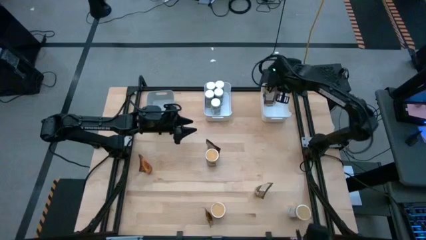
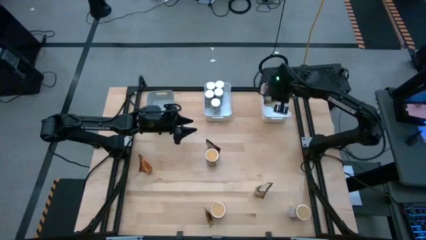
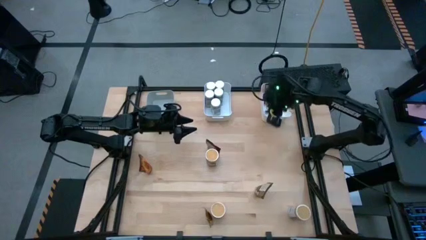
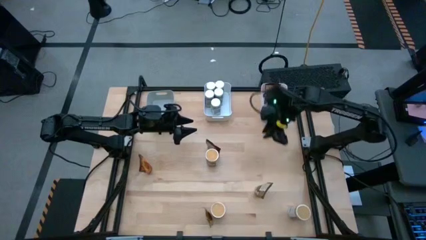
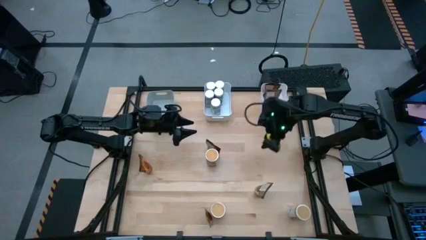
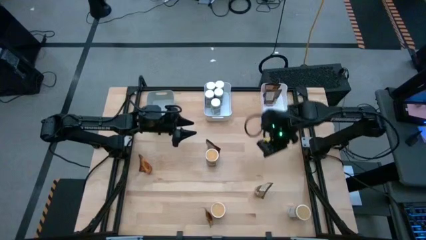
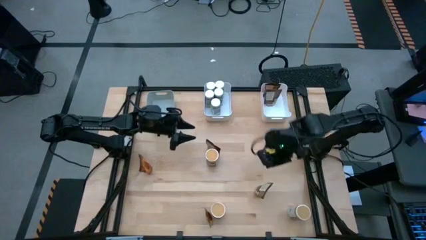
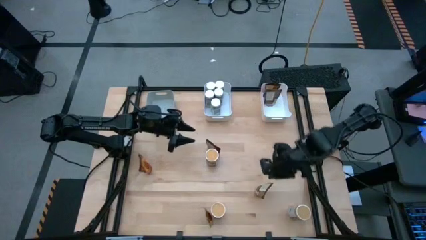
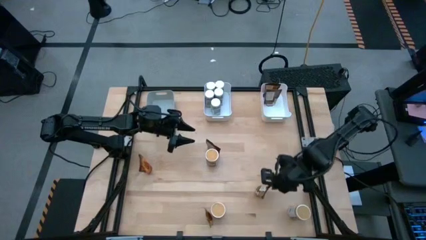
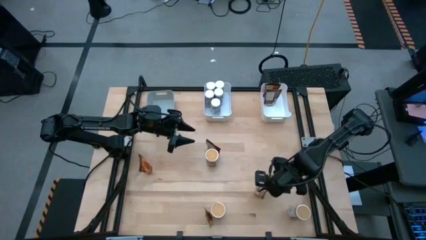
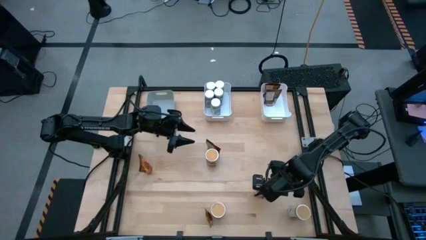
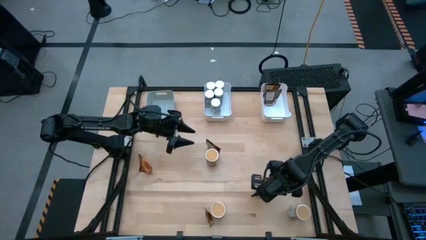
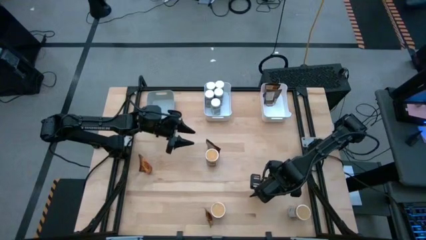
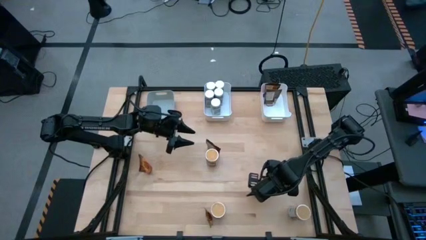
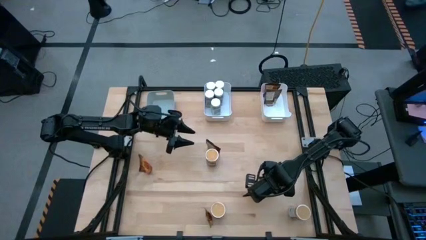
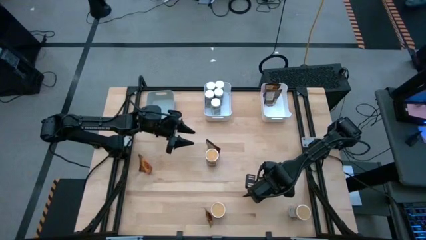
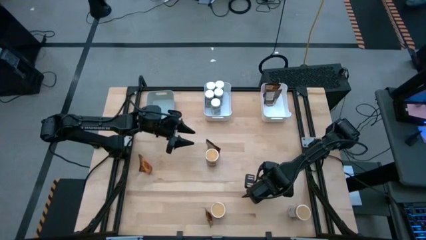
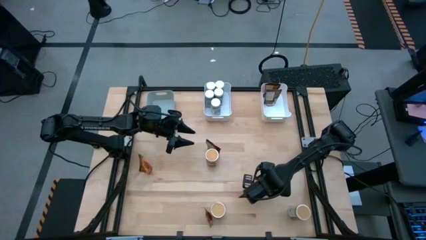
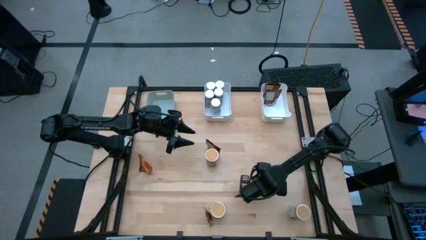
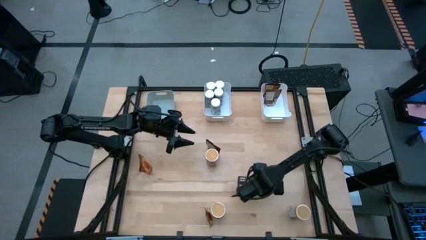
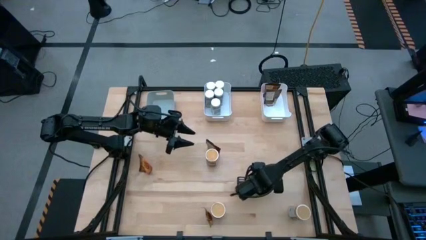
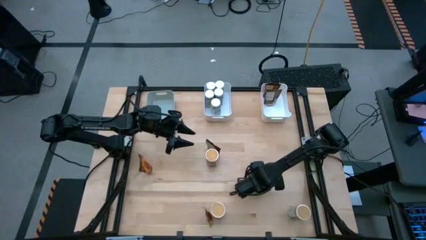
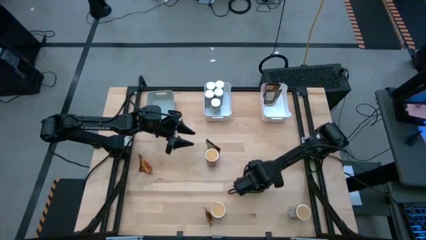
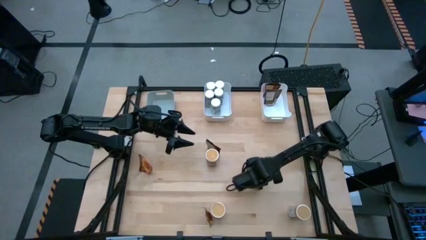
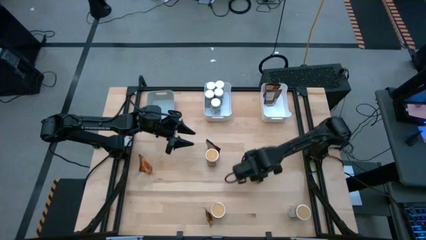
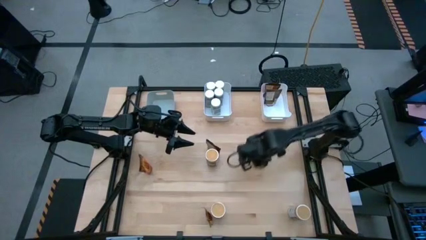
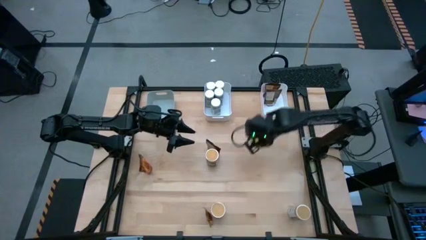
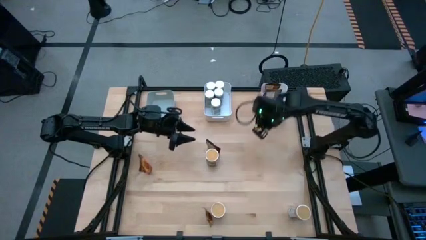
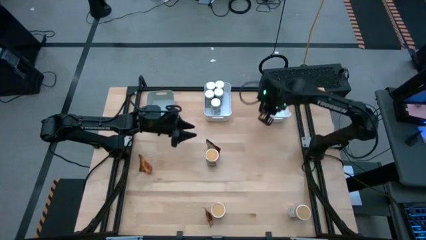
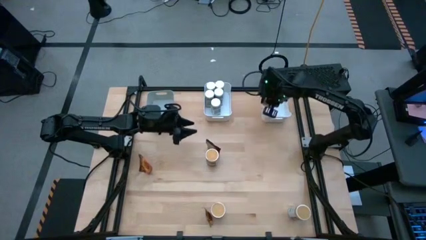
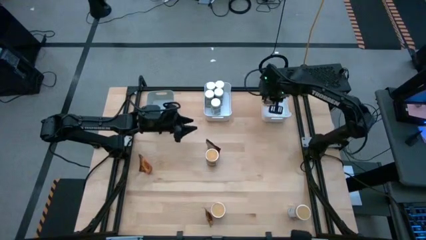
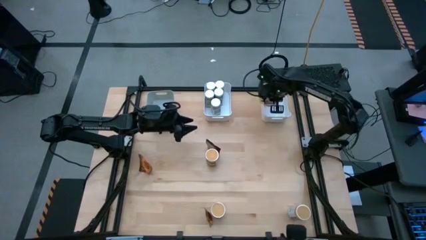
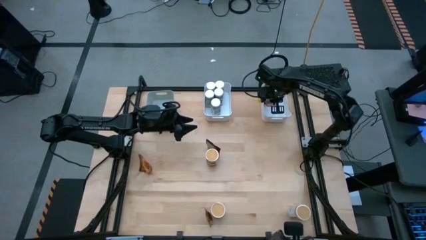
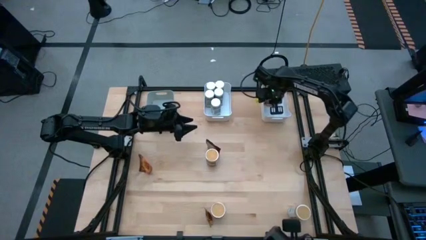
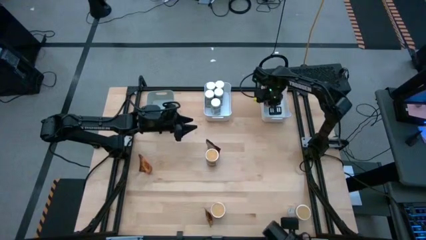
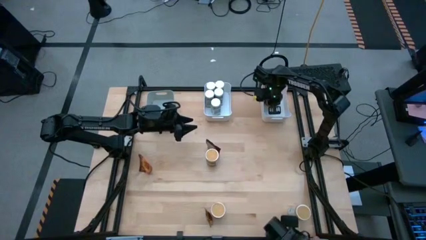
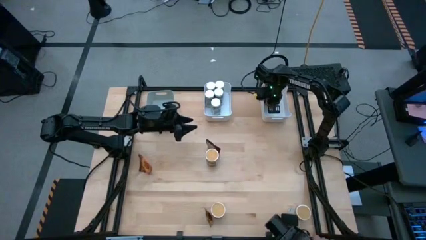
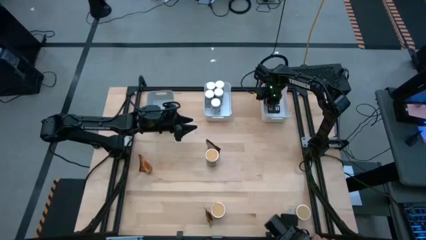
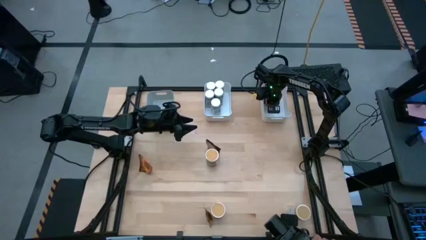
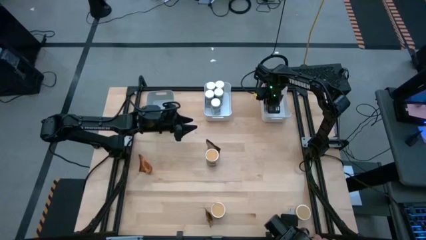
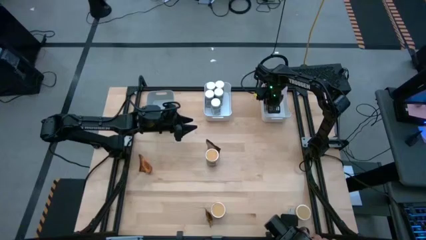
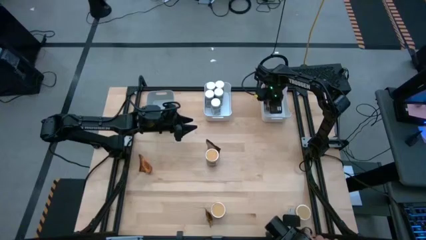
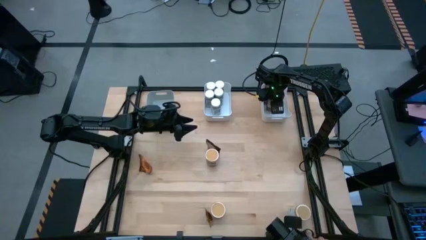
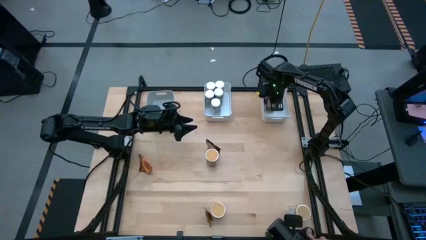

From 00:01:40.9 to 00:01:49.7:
Task: Sort spices by type
Put the orange seasoning bag into the right white bin

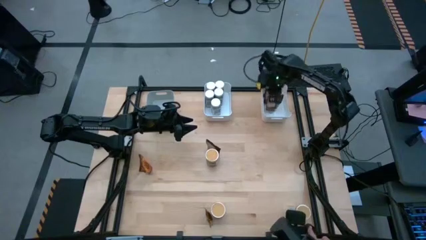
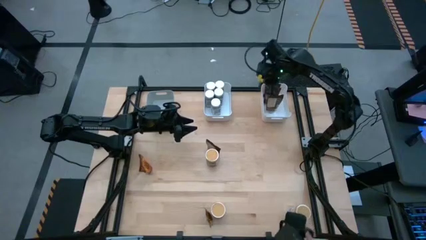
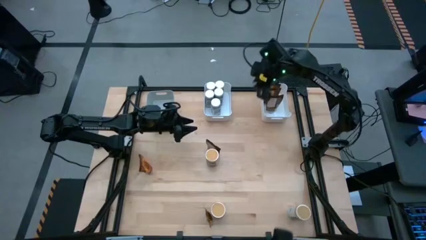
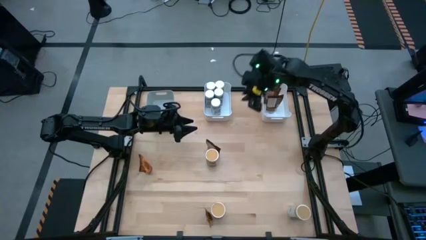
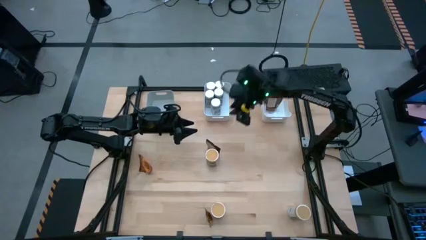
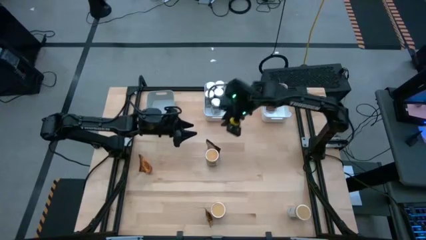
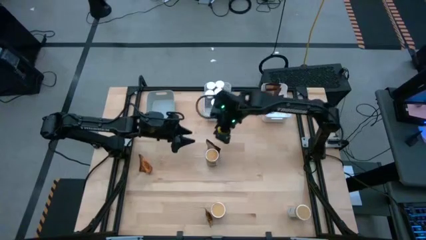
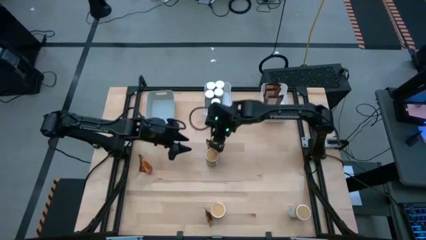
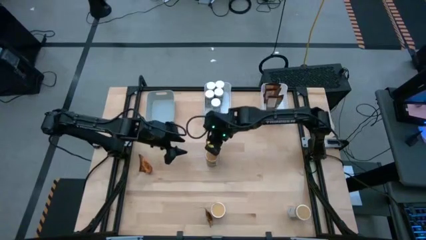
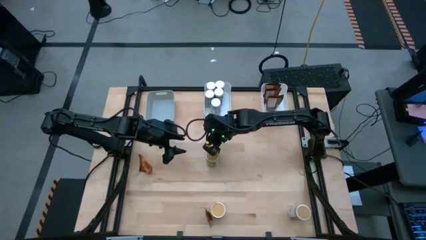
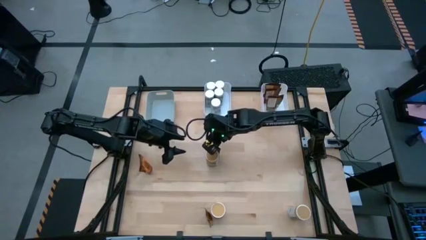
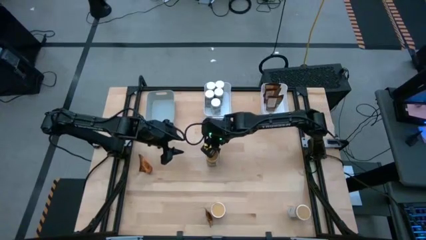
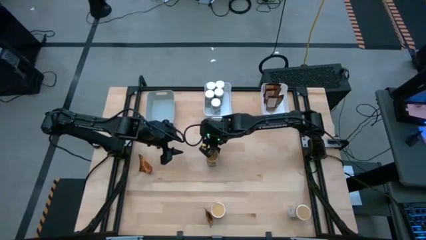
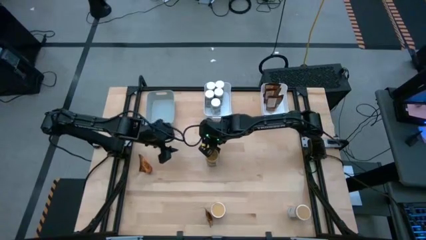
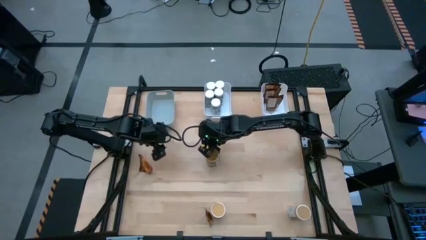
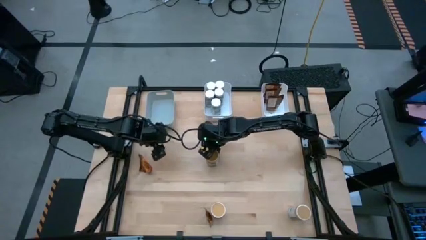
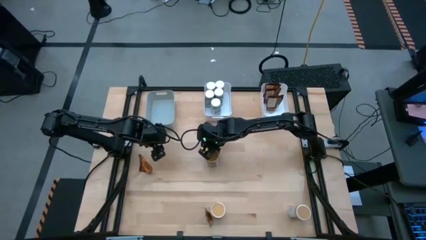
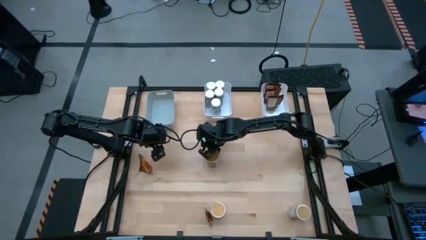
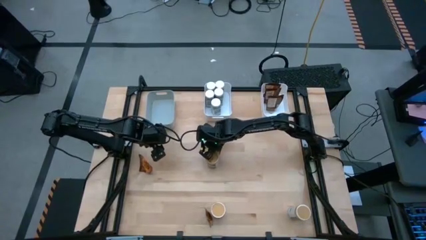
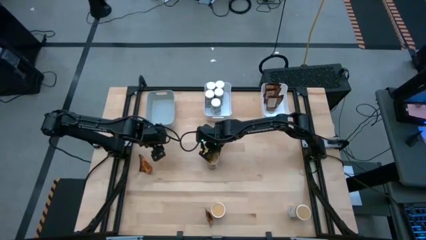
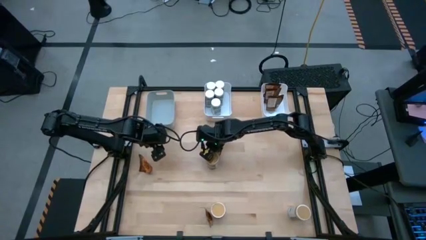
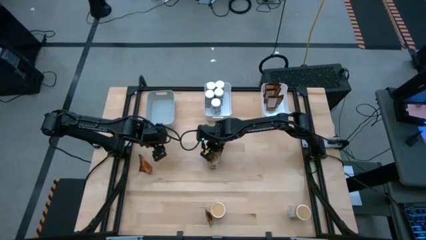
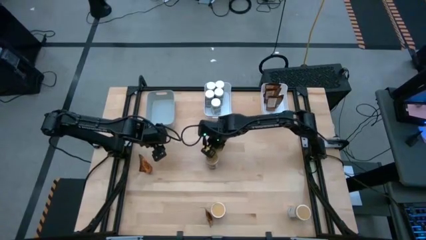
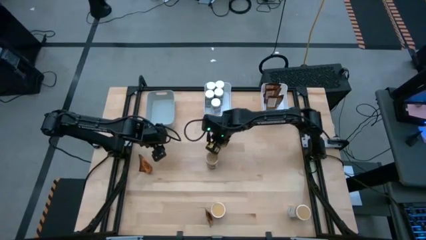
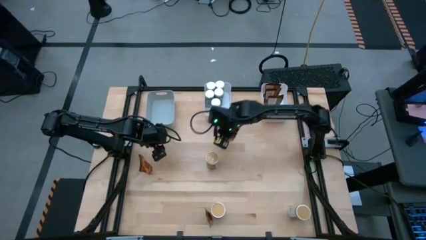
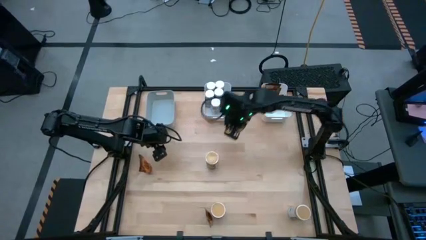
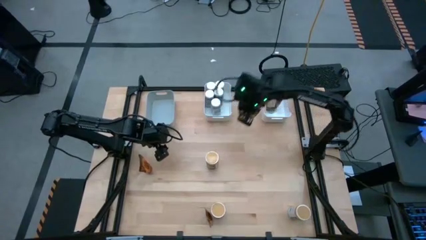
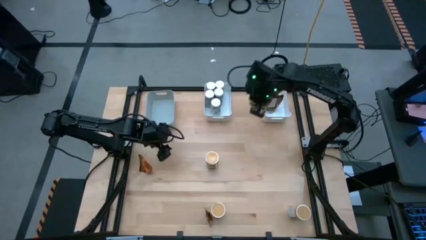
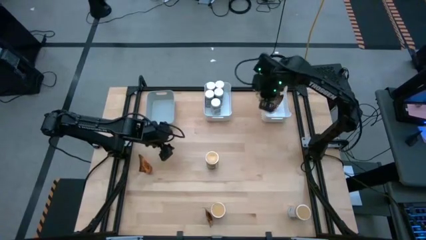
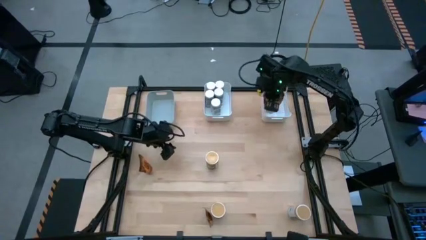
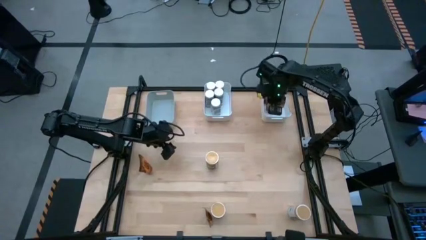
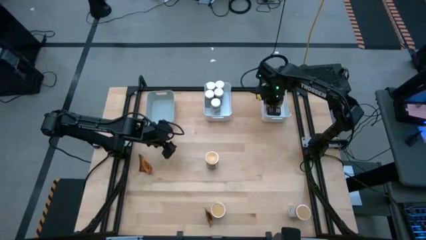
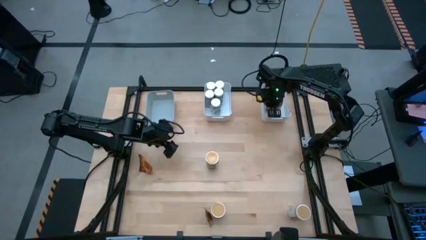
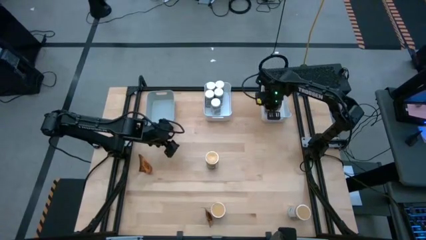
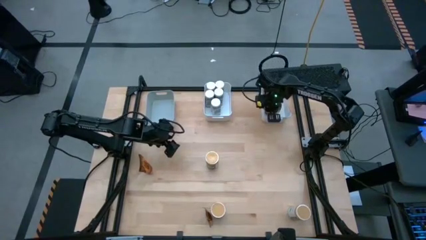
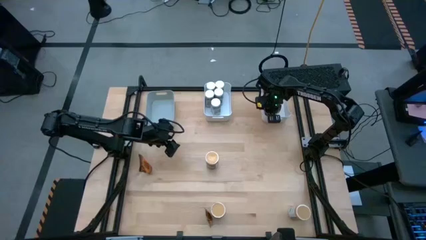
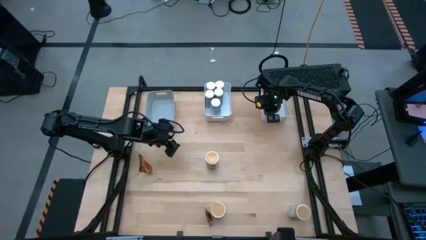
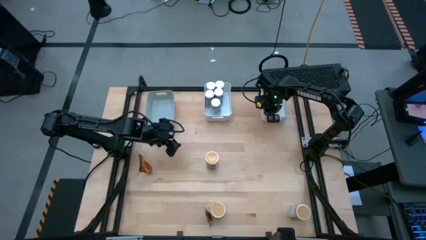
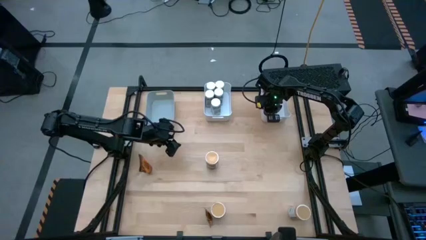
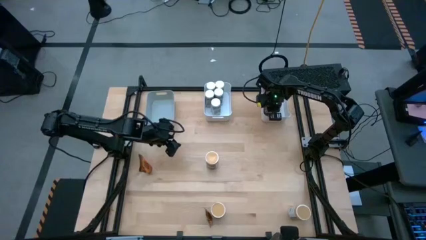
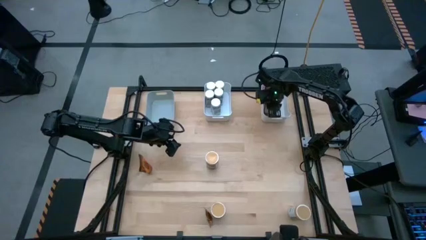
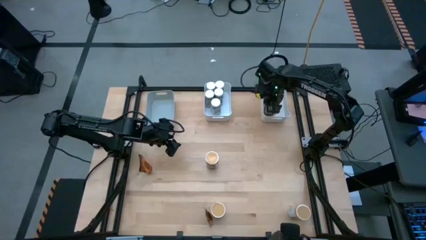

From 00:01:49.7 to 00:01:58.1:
Put the orange seasoning bag into the right white bin

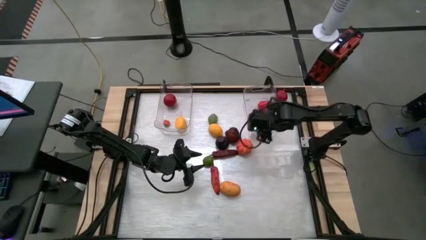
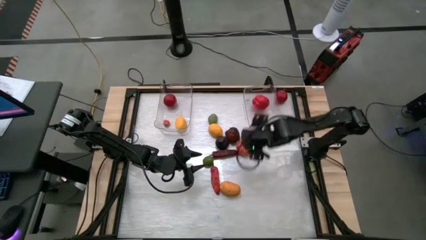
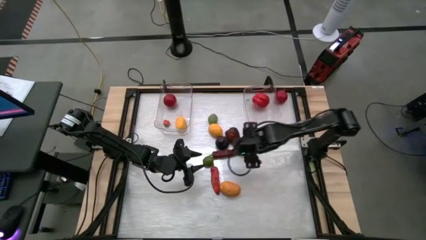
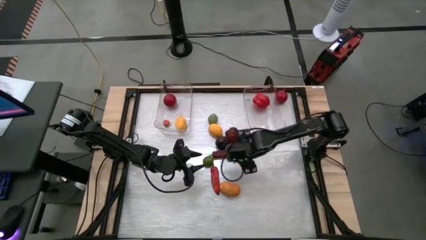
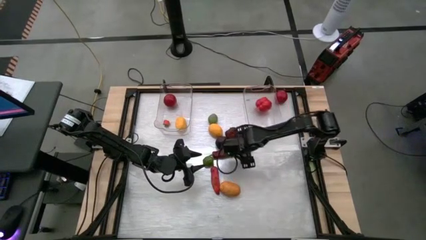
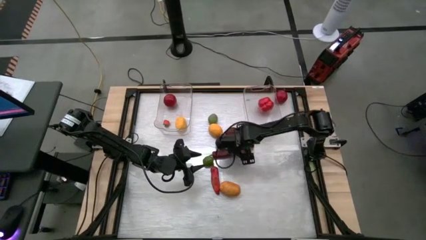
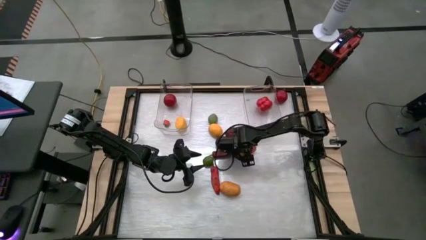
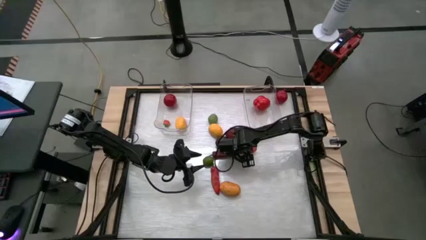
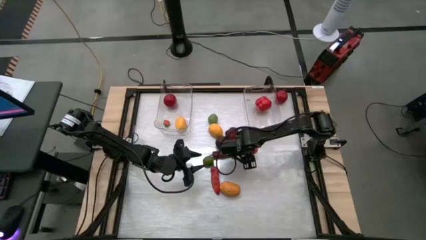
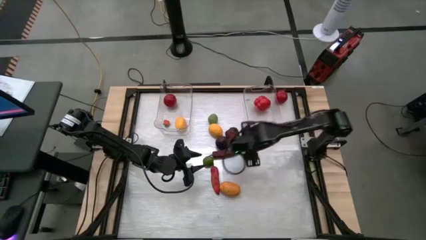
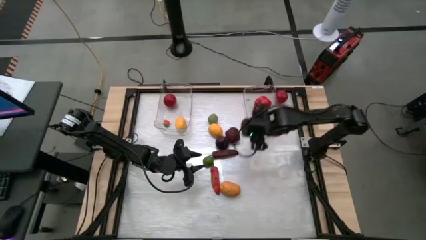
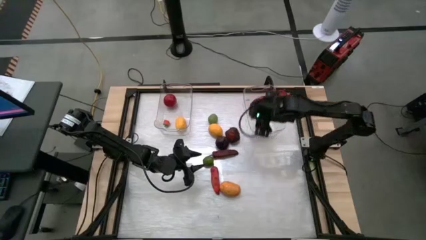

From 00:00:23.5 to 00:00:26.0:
Task: Sort produce into baskets
Put the squash into the right transparent bin
